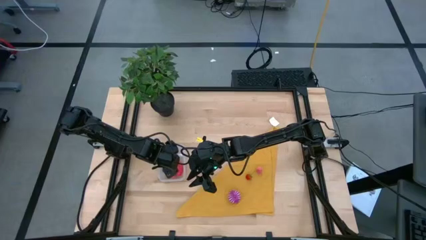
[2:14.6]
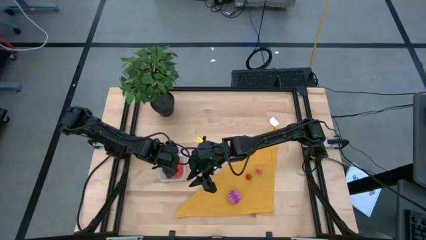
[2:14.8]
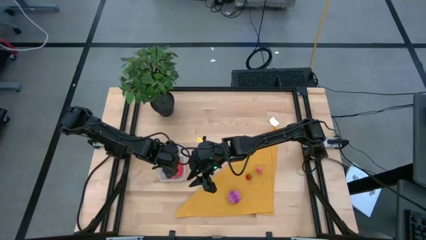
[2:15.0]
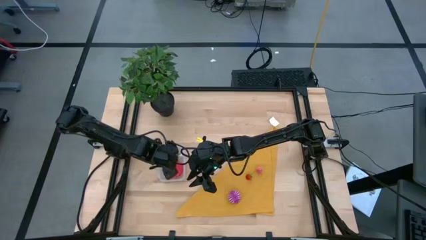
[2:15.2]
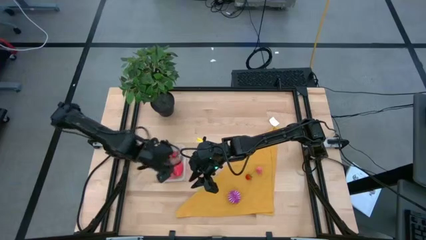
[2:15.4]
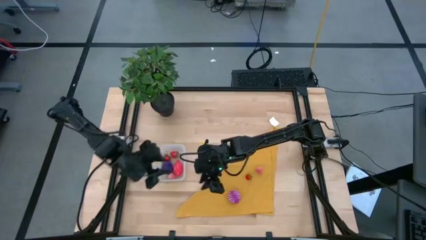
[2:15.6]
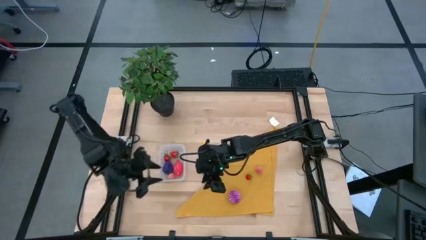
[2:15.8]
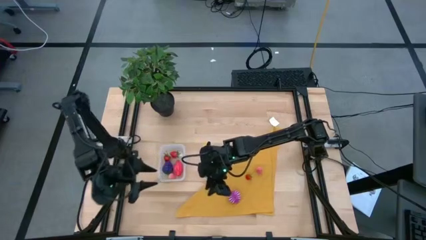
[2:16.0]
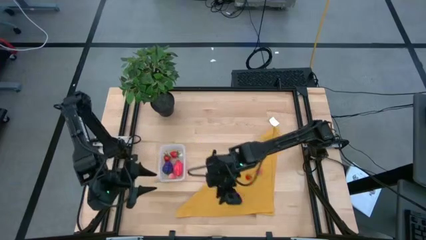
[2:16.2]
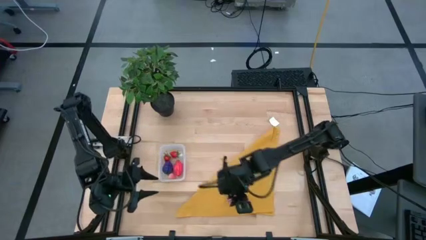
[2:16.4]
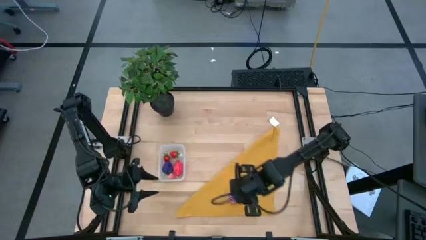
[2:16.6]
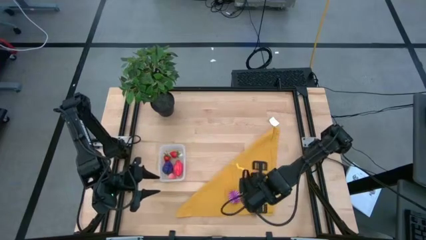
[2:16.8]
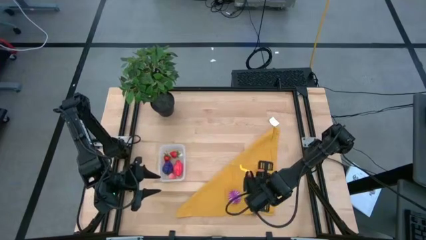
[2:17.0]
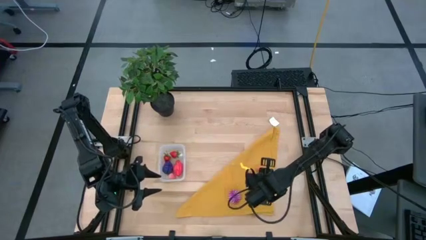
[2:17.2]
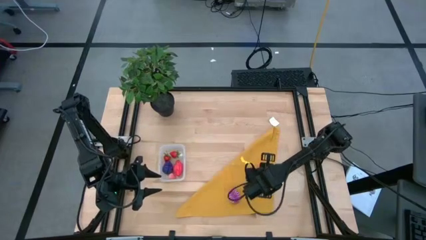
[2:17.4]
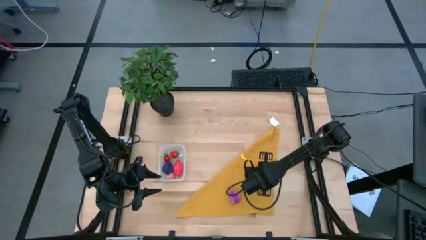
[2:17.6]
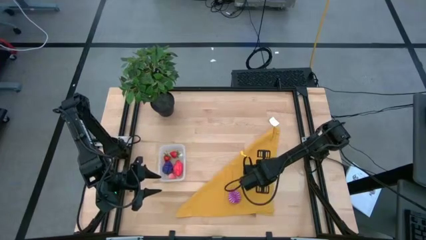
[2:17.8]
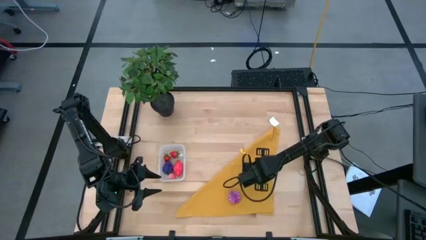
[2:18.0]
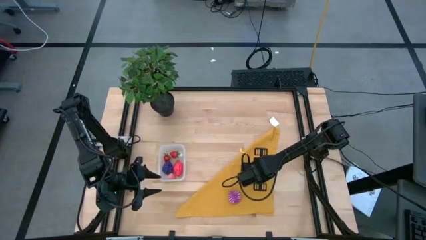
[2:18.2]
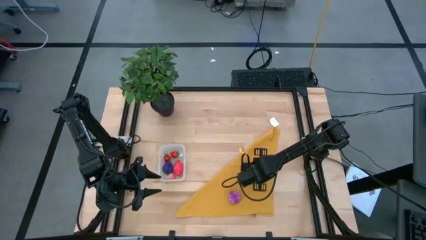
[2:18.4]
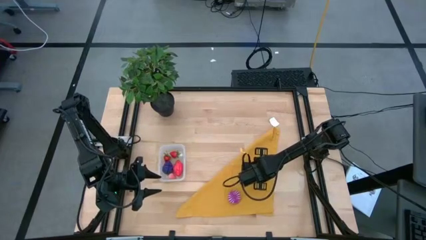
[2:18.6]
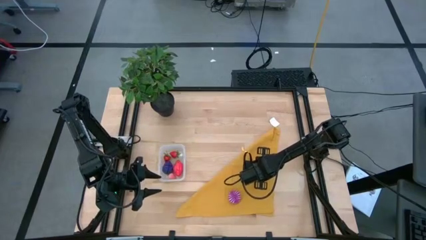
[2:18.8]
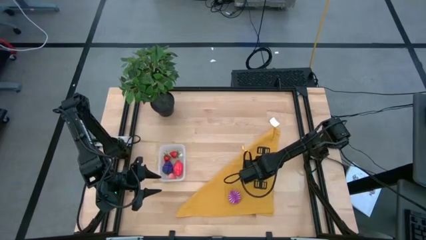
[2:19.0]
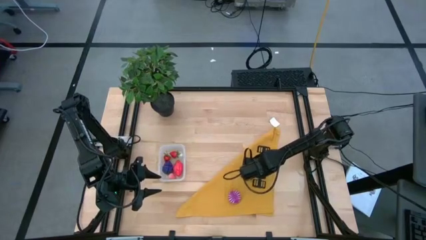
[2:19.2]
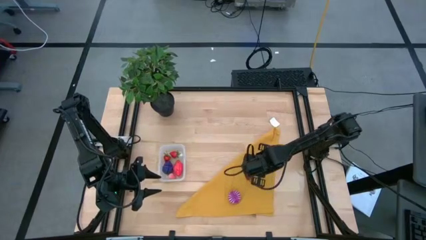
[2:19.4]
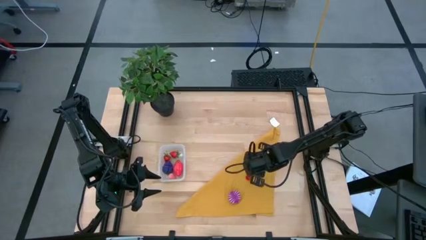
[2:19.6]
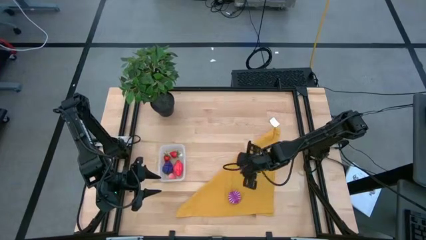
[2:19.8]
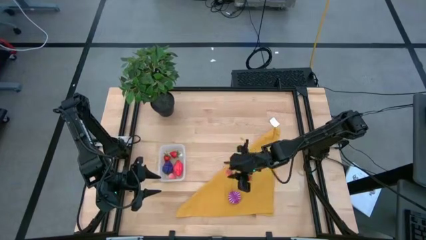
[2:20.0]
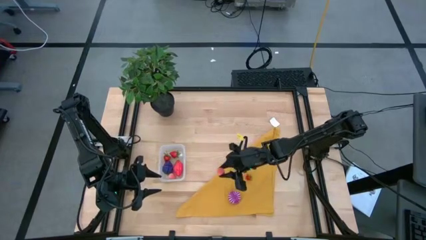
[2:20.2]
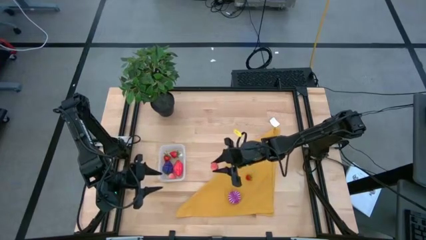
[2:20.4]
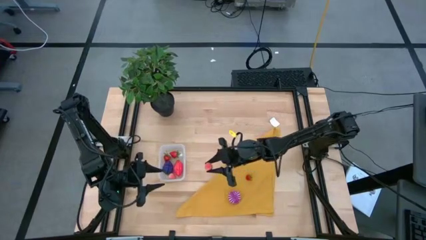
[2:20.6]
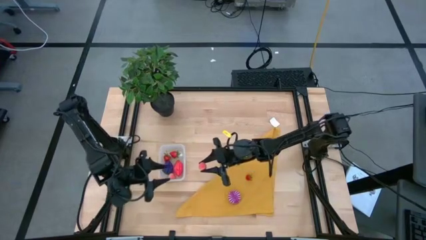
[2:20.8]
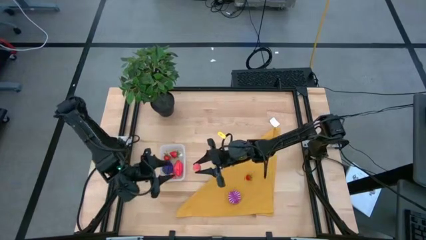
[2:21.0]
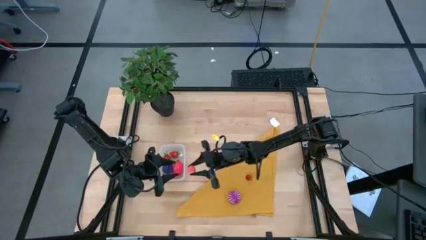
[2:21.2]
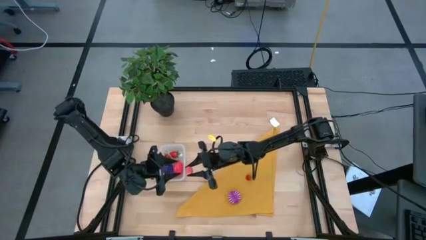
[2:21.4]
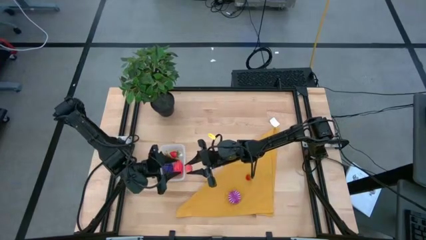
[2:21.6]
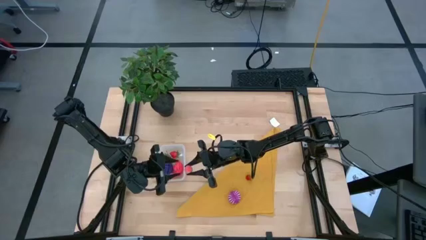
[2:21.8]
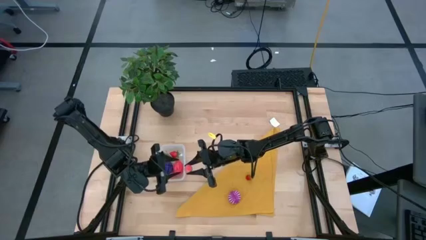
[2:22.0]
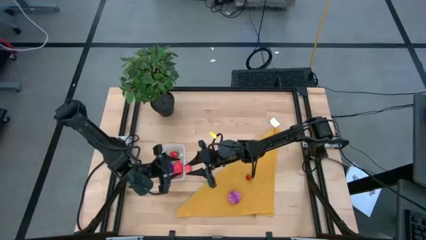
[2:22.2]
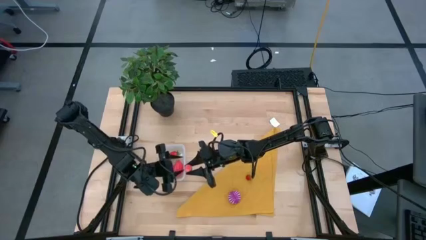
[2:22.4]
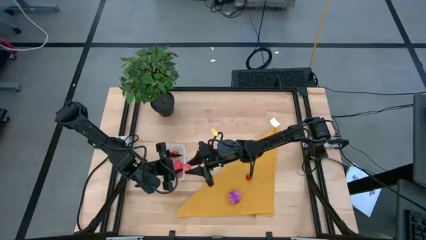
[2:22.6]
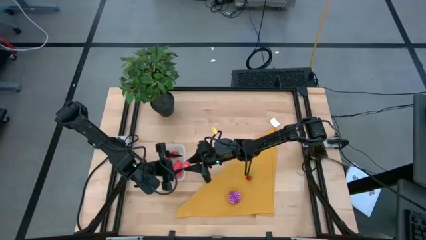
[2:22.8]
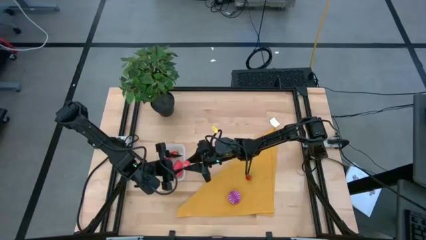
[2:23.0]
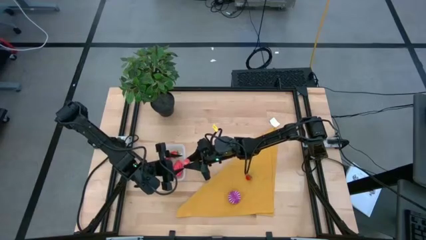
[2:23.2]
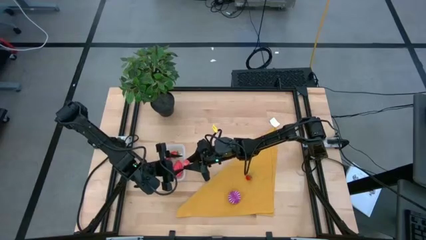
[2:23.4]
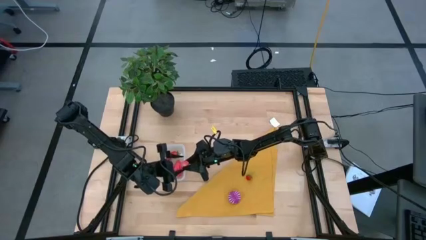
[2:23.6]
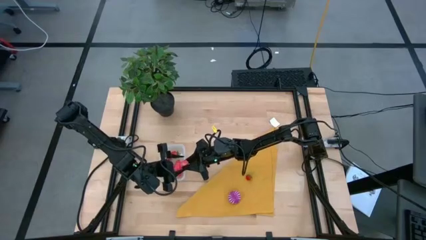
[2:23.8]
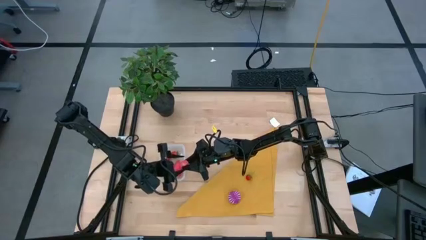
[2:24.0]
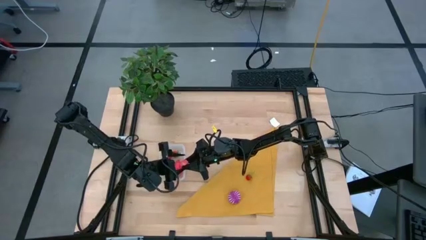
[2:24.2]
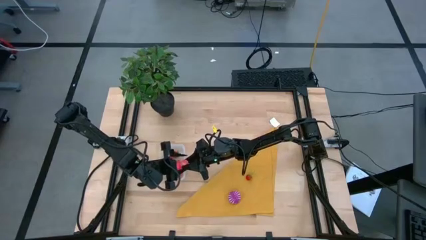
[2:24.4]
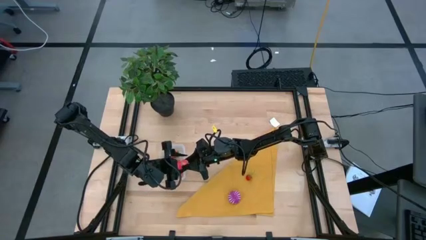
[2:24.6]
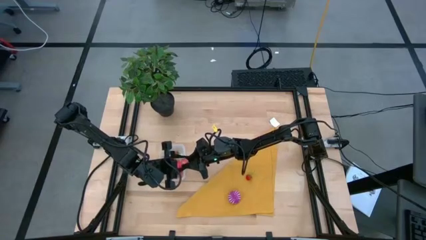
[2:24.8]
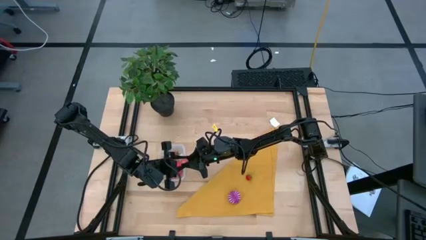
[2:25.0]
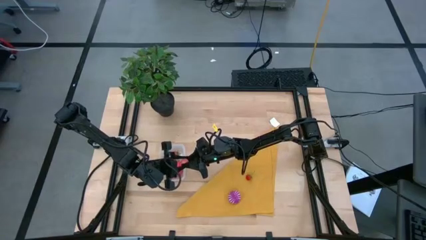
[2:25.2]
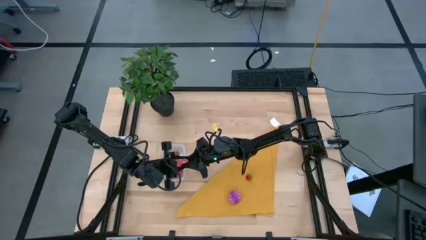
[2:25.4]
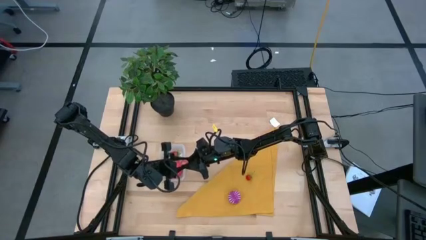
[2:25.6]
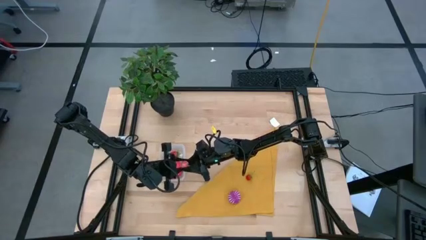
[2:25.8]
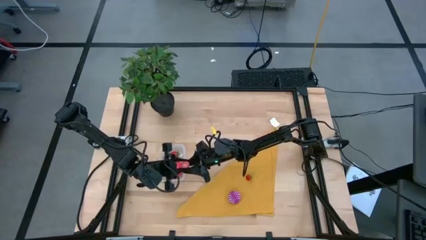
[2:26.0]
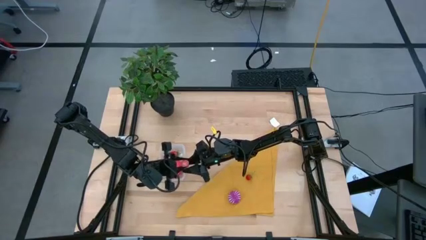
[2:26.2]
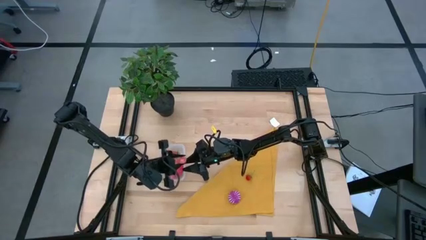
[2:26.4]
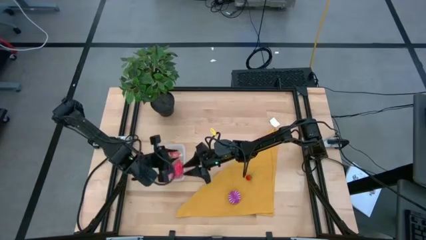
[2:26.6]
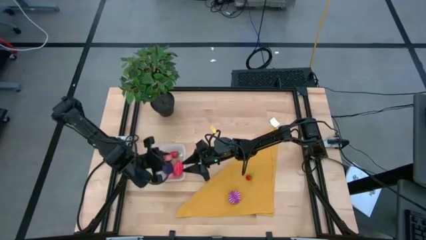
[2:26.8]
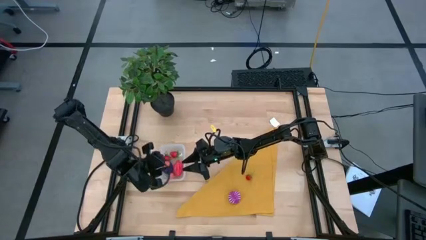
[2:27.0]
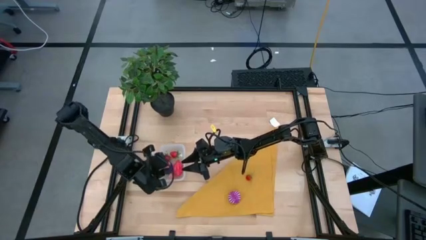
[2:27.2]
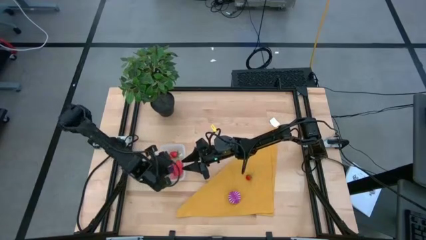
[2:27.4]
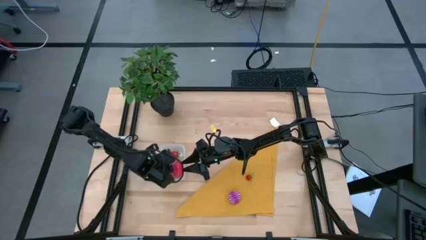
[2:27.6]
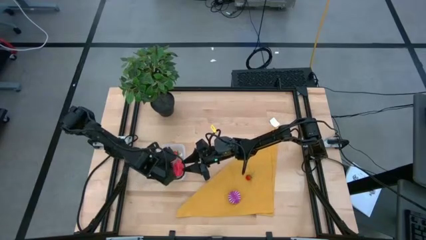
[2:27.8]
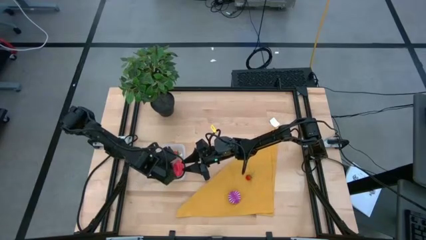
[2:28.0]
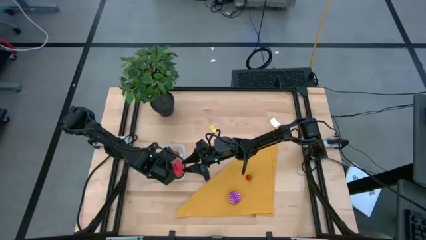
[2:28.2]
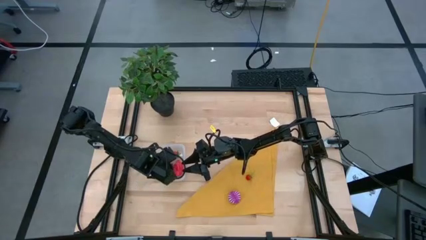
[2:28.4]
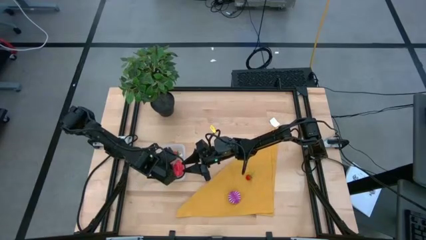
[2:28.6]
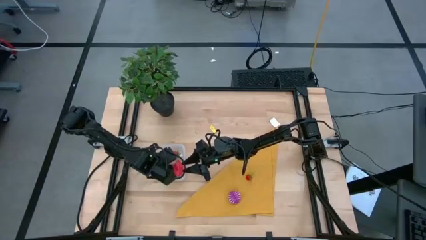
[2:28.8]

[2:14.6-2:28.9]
Task: Pick and placing Produce into tupperware
Put the pink peach into the transparent bin

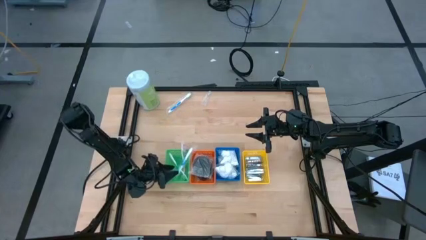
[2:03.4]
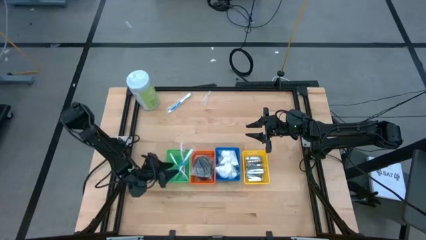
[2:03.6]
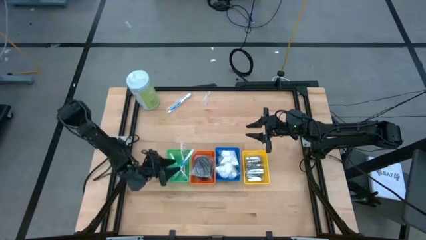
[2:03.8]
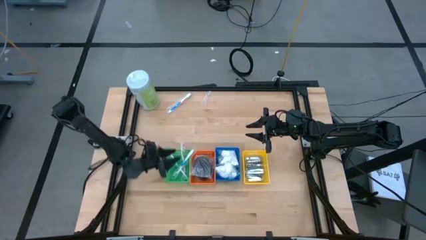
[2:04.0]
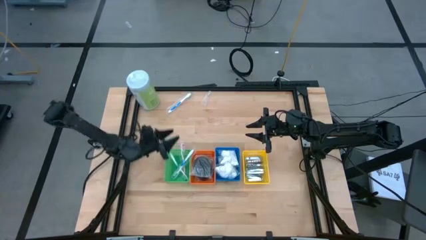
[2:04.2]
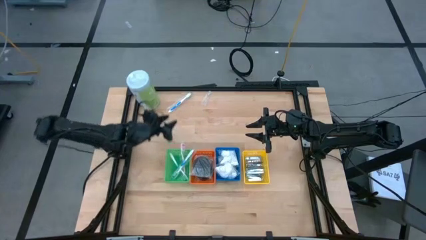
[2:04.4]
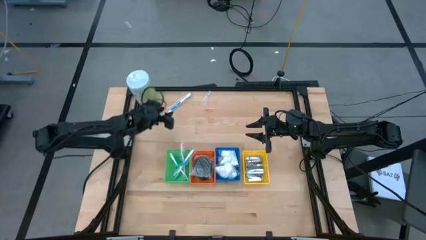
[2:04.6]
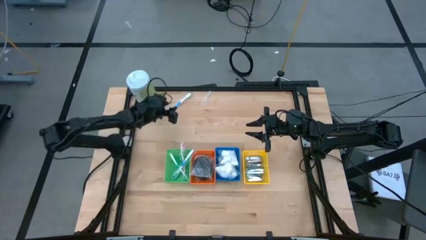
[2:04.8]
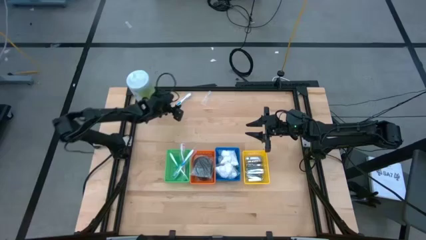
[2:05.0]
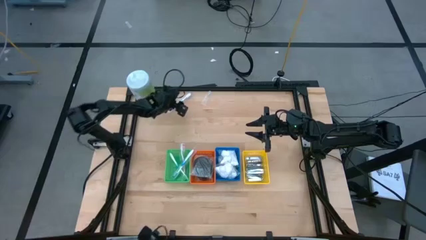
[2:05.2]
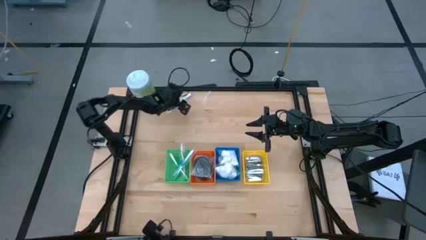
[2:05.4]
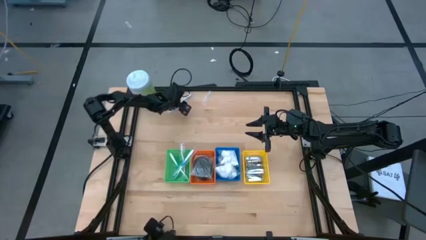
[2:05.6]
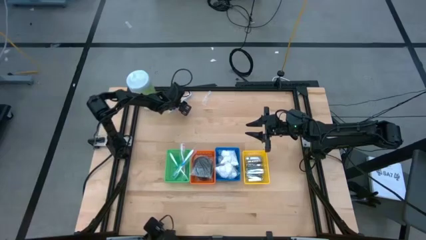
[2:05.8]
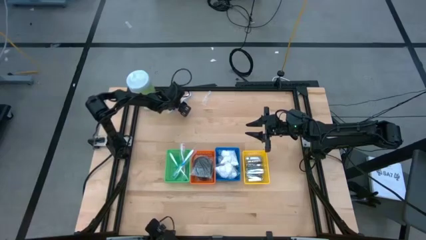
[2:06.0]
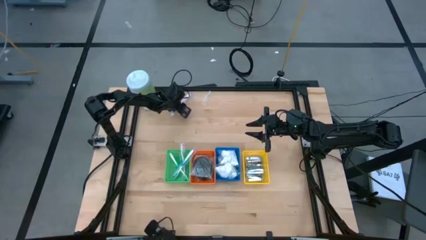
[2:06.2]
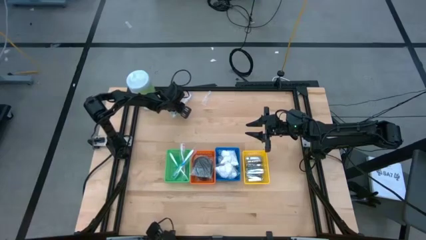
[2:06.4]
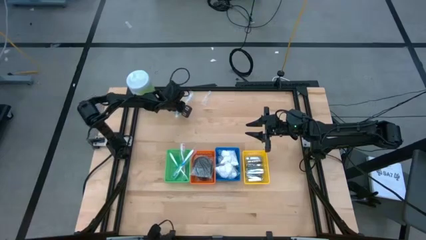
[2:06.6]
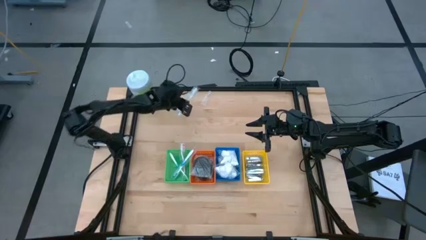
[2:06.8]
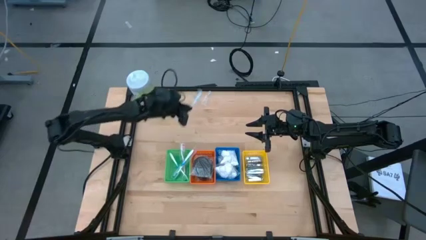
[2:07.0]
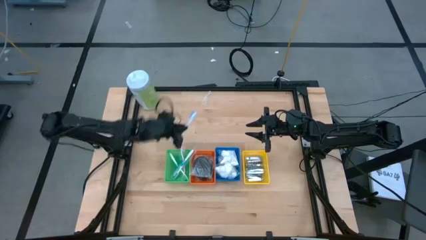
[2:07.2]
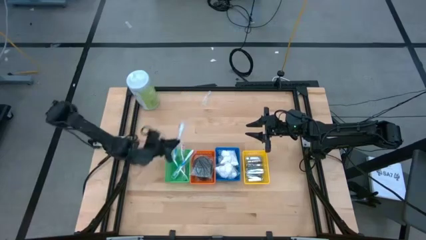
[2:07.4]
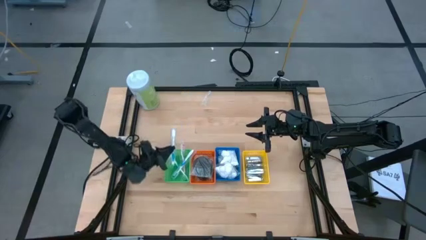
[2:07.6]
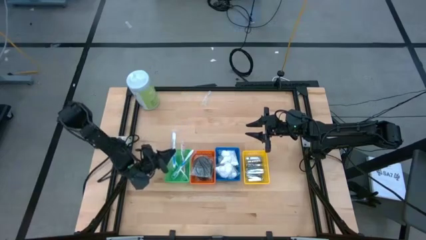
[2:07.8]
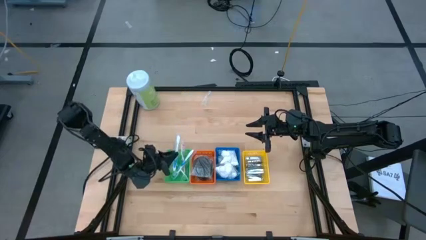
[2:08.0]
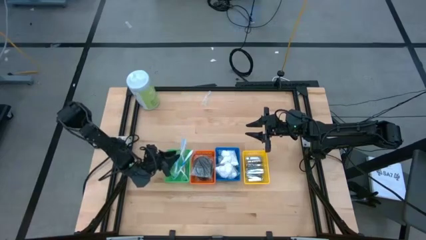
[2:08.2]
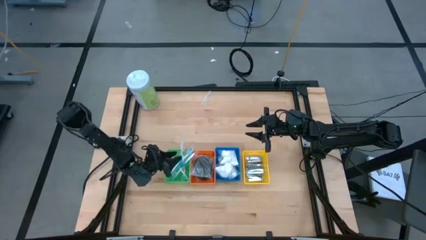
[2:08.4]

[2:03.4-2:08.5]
Task: Pick & Place Travel size toiletries
Put the blue toothbrush into the green basket
